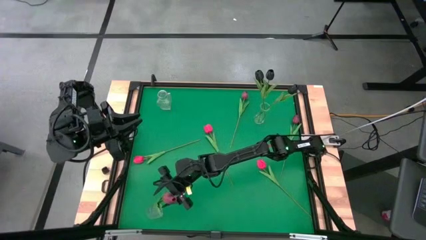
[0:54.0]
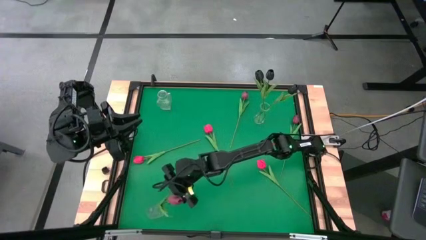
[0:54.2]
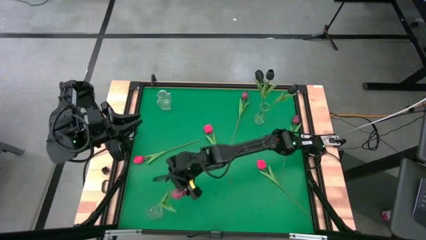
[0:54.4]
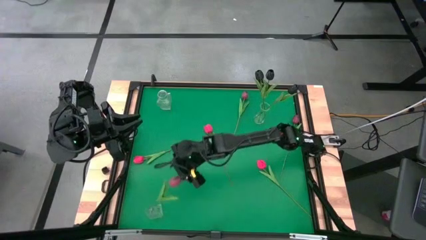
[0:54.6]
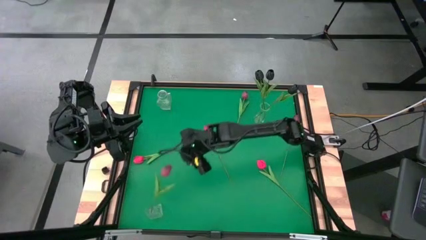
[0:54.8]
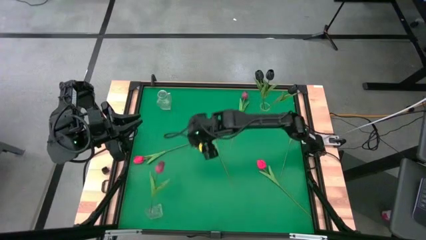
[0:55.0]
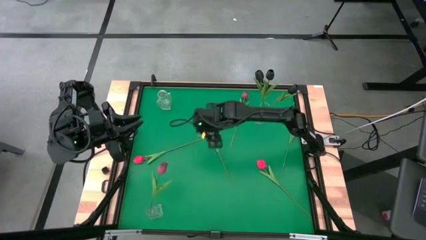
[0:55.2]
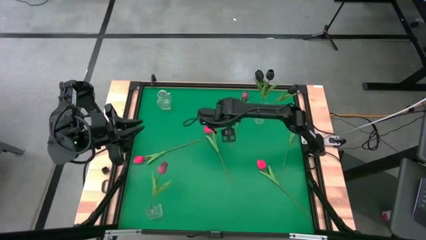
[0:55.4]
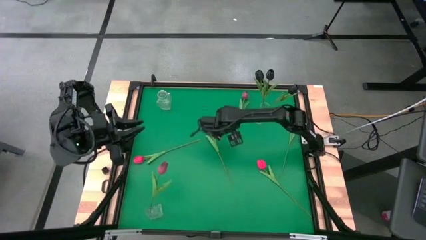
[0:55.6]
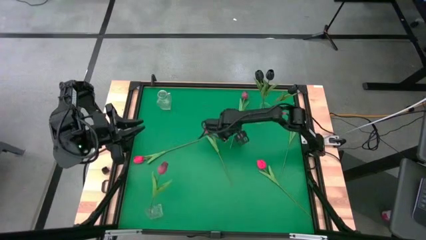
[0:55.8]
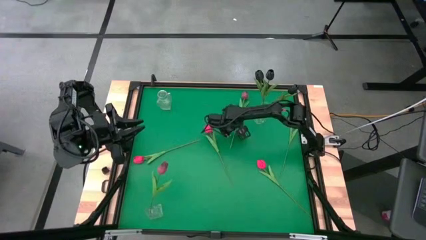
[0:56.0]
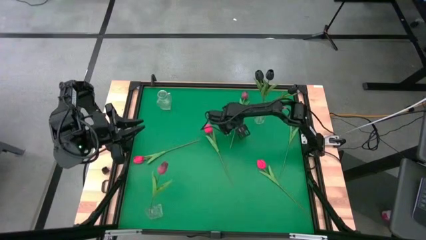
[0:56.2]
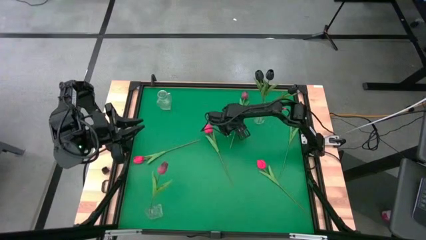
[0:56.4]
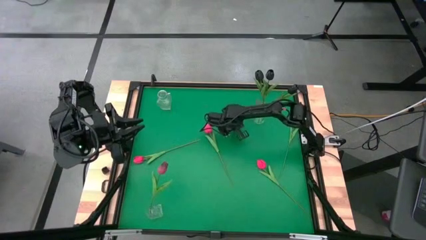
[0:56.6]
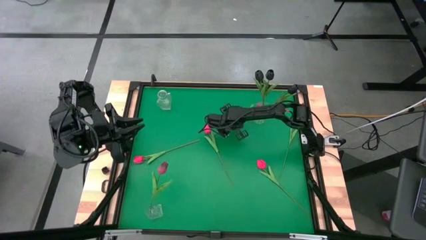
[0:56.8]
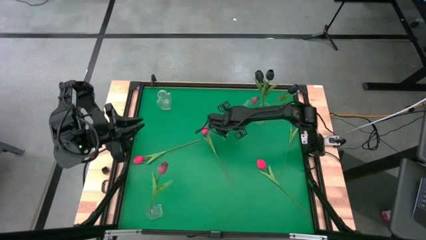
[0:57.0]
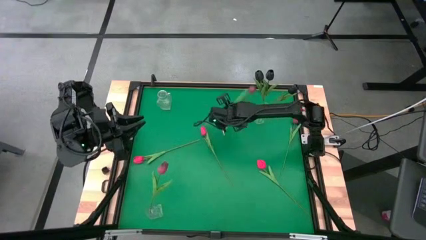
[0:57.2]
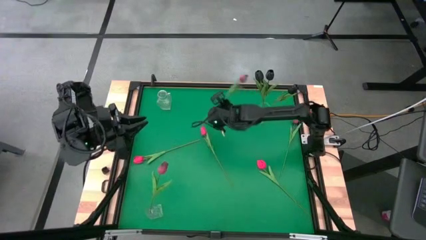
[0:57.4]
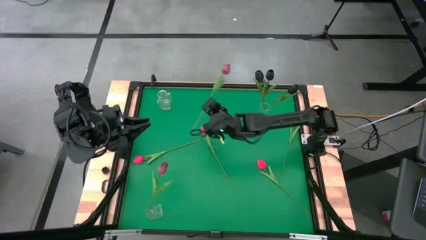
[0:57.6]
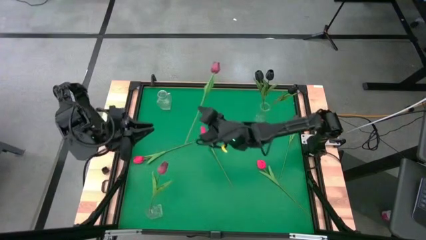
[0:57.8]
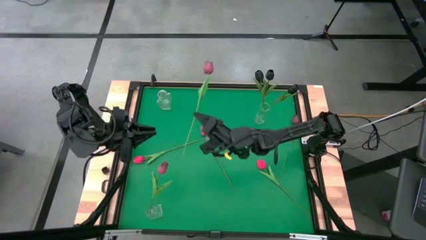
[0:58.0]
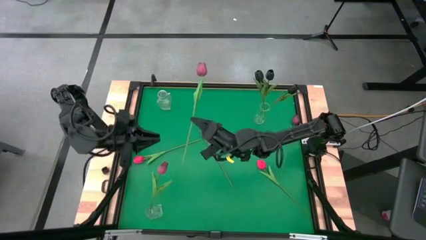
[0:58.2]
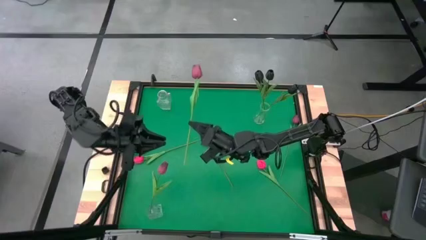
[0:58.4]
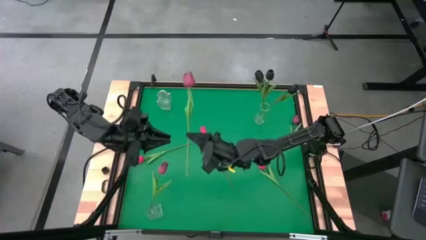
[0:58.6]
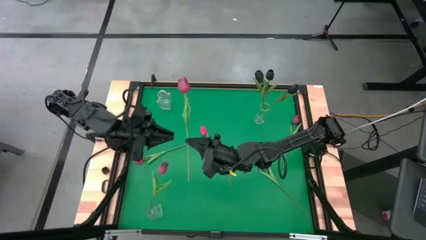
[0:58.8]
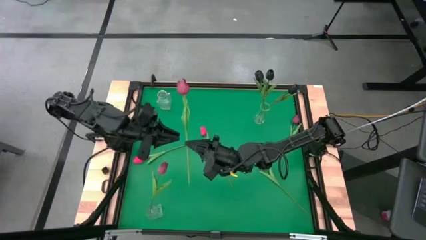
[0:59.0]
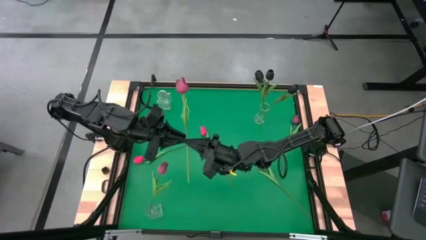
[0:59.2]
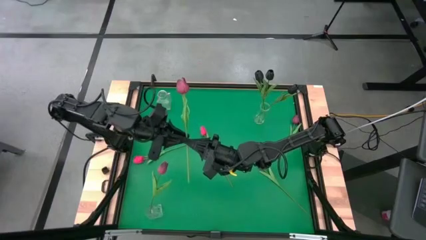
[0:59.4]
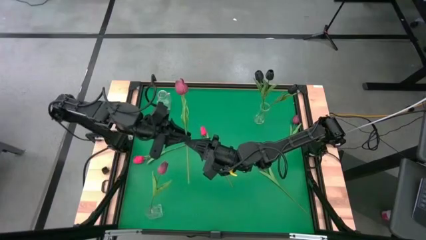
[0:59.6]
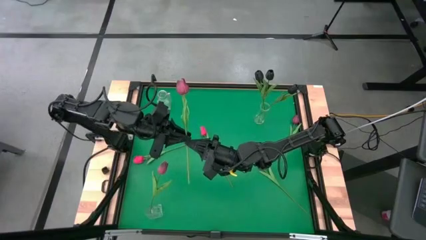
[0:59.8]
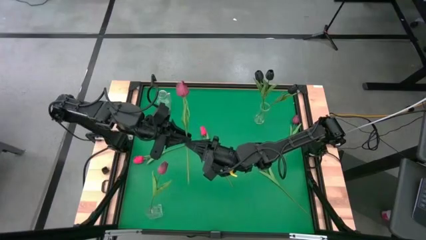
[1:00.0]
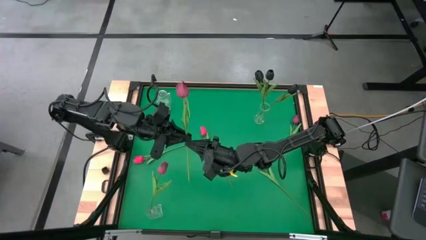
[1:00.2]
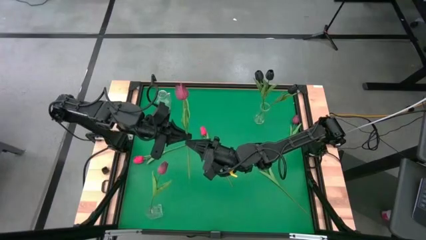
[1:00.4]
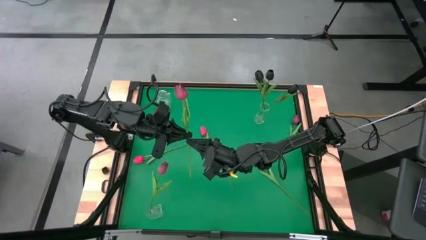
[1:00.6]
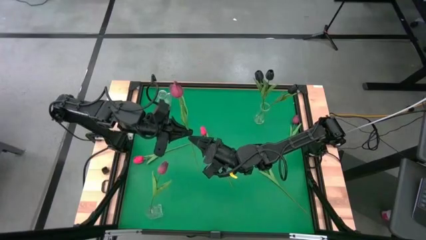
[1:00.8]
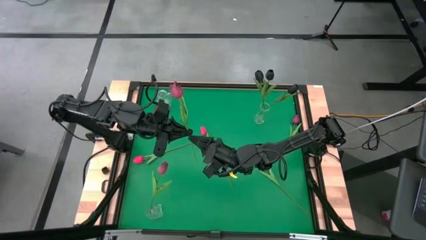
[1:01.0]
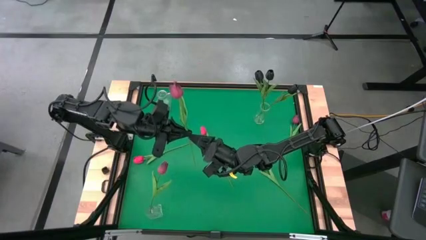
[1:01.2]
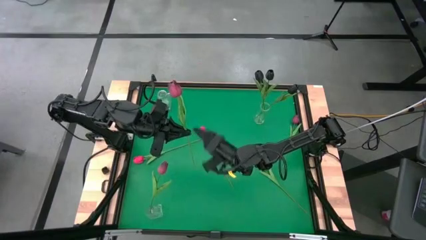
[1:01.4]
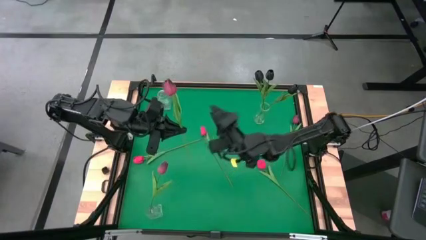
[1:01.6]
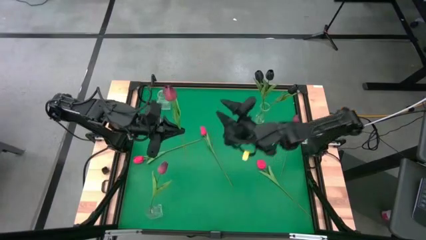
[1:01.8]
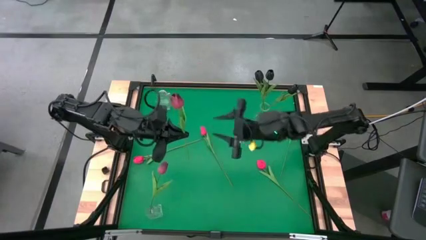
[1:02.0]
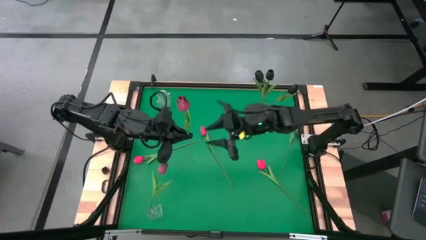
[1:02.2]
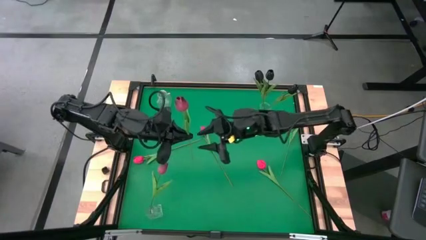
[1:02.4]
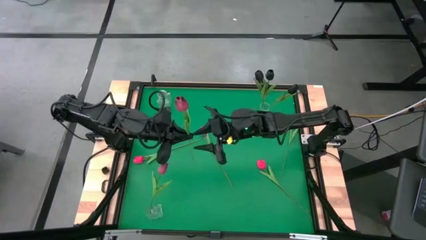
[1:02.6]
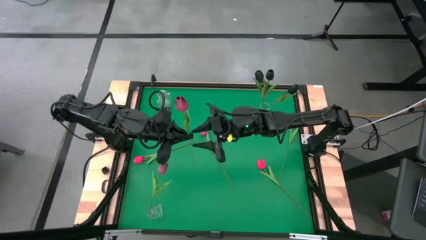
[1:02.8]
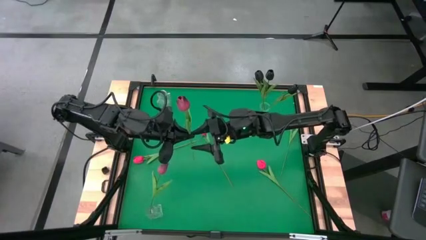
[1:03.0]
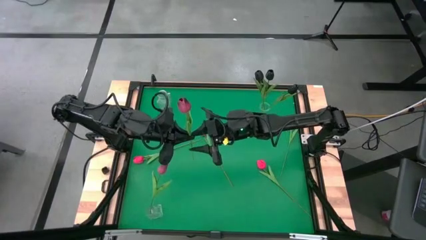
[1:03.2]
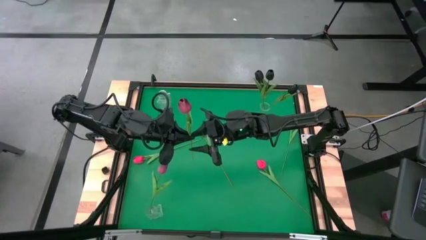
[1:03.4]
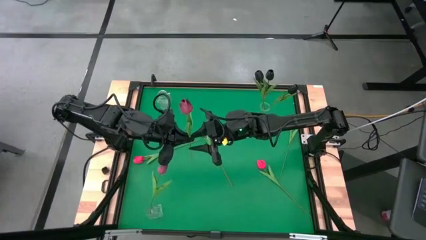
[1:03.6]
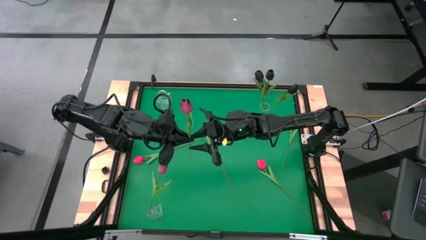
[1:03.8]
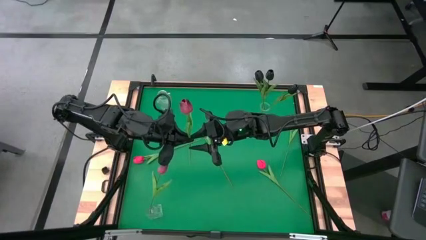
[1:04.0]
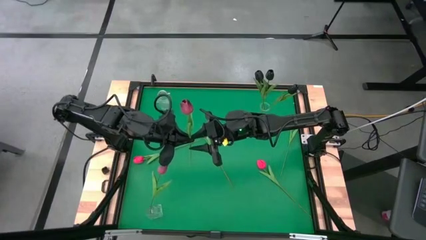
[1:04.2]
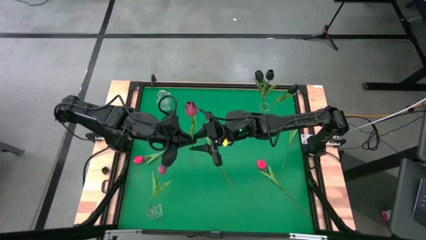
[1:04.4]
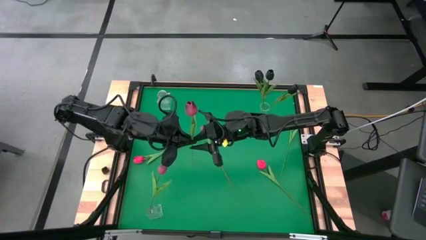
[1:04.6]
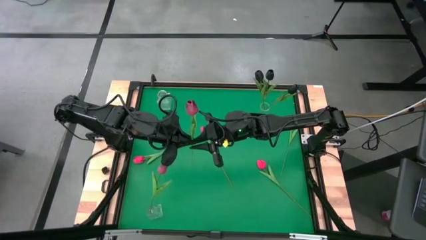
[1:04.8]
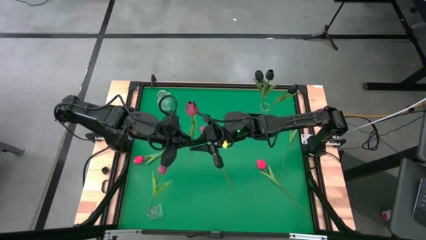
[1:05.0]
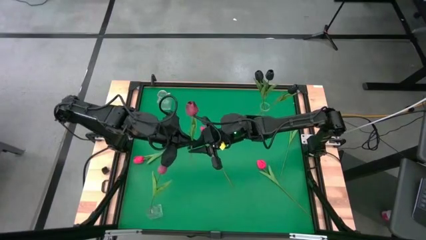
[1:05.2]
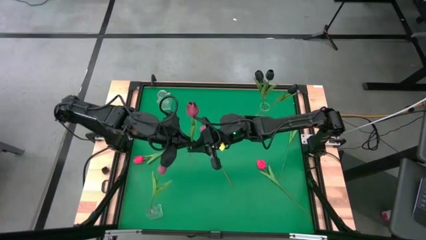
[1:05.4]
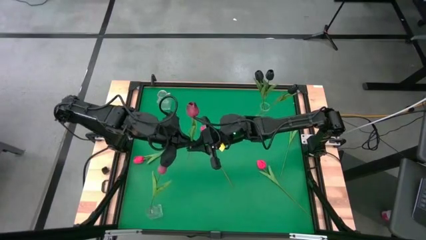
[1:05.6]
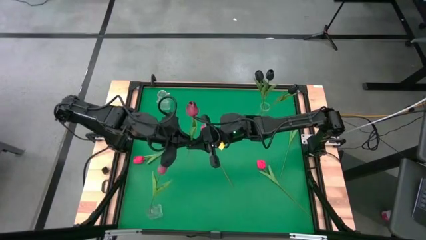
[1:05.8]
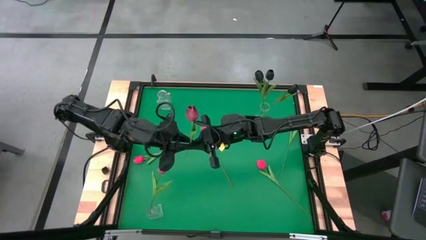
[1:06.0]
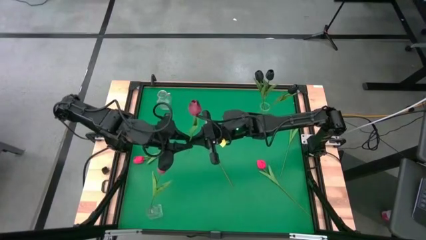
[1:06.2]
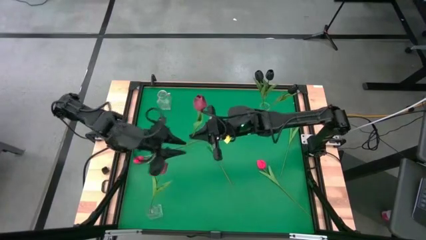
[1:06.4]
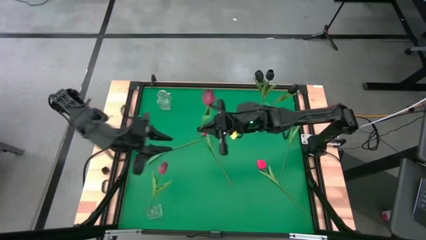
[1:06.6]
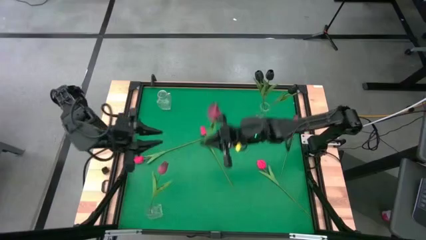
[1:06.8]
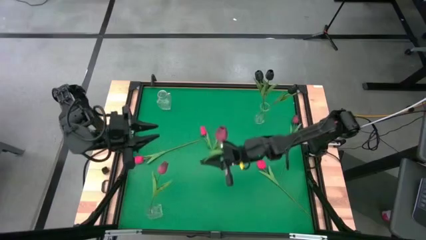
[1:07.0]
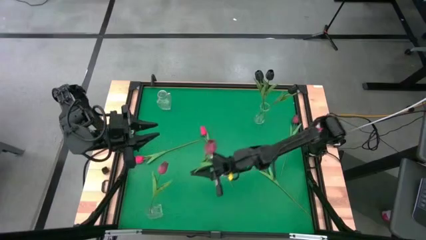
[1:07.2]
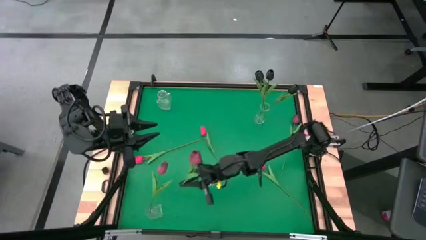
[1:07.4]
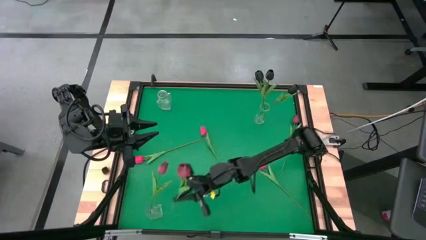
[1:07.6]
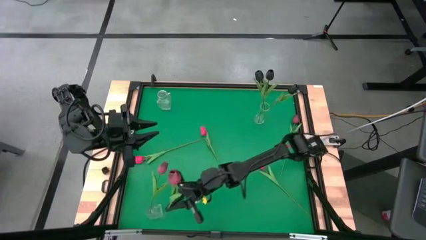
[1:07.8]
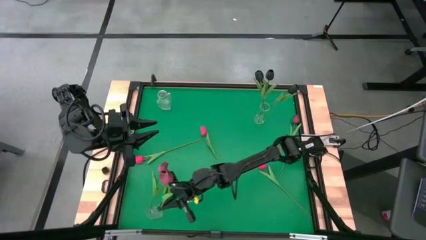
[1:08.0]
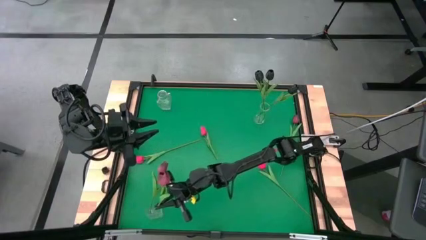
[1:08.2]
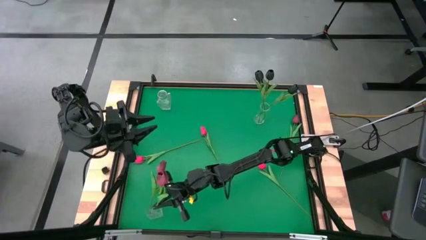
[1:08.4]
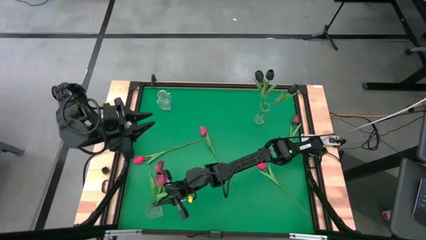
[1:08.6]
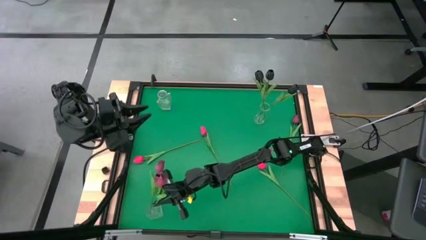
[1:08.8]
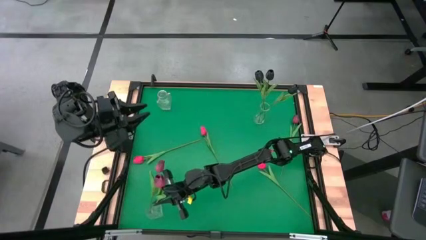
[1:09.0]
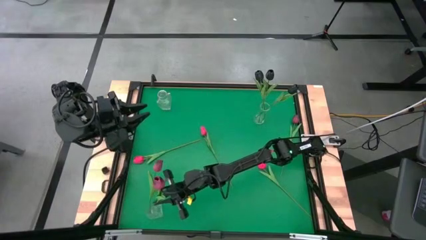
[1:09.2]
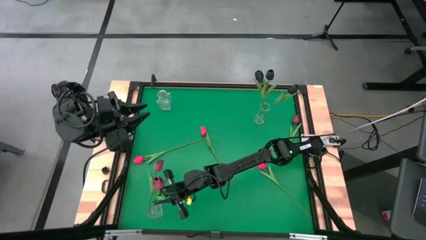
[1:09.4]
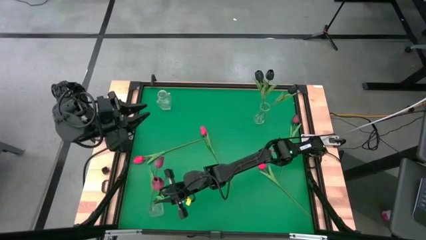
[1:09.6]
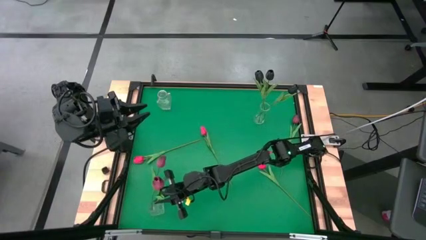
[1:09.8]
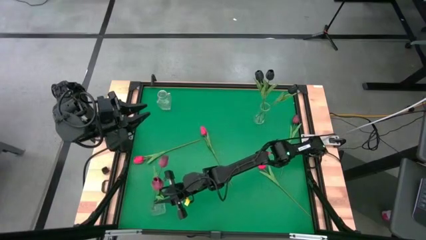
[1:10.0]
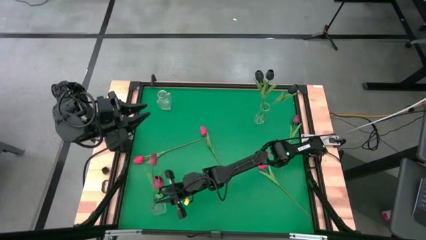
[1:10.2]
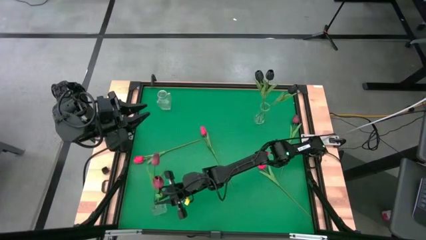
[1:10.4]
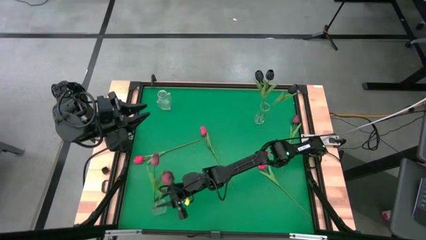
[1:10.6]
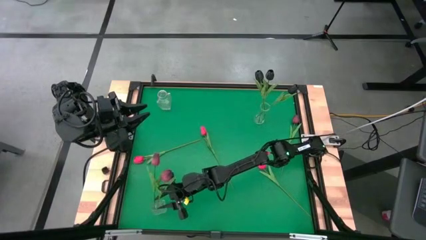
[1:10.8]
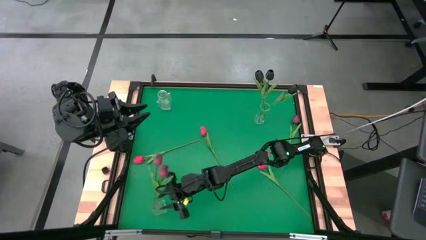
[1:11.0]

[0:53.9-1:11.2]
Task: Sort flowers into vase by color
Put the left dark red flower into the bottom transparent vase
